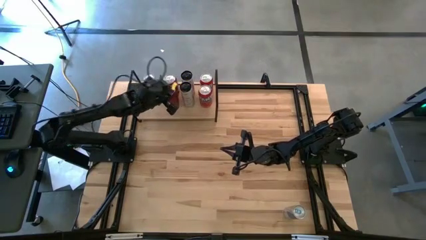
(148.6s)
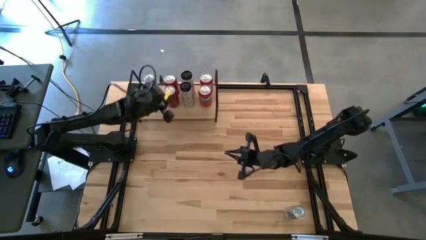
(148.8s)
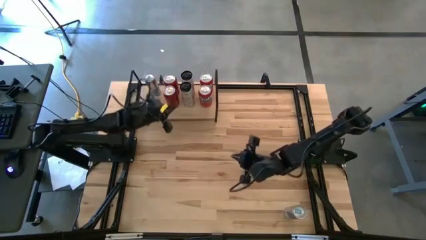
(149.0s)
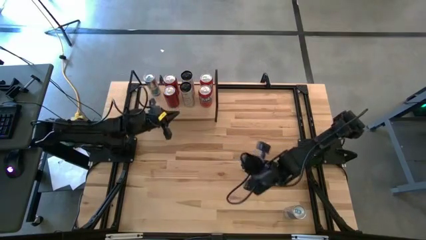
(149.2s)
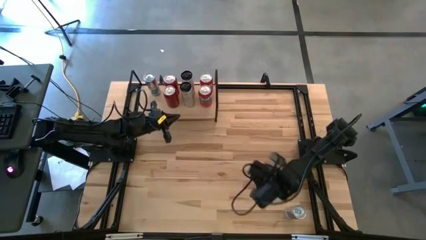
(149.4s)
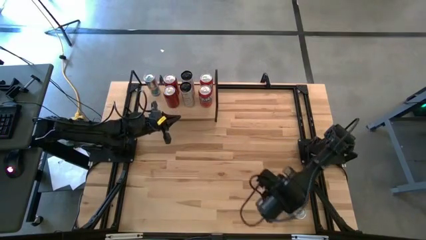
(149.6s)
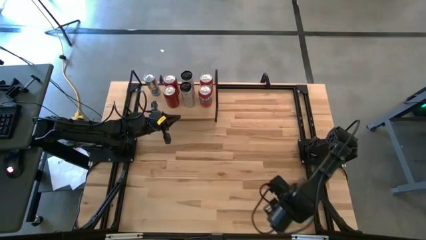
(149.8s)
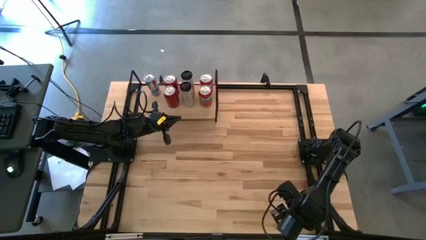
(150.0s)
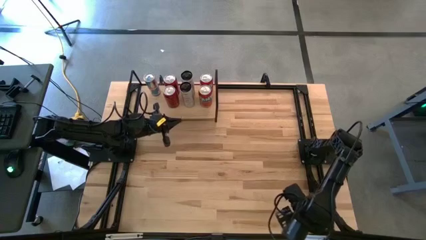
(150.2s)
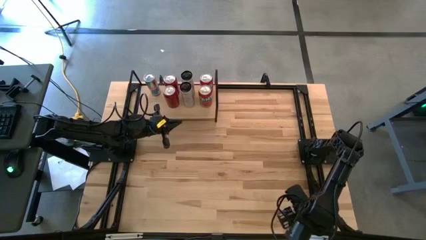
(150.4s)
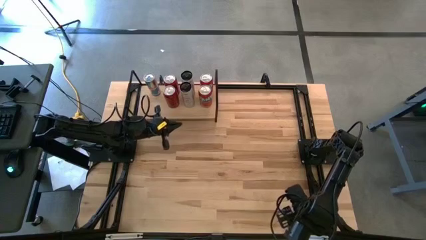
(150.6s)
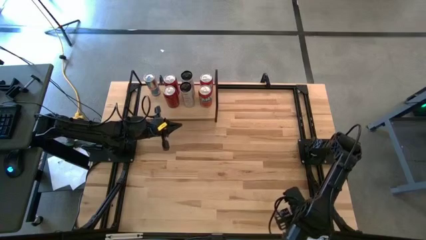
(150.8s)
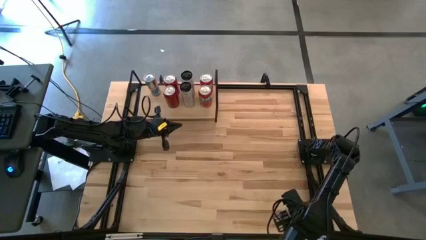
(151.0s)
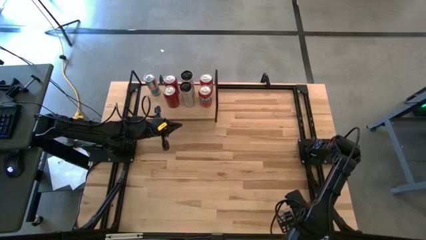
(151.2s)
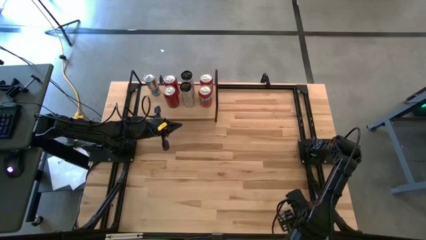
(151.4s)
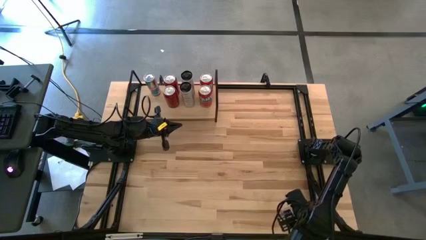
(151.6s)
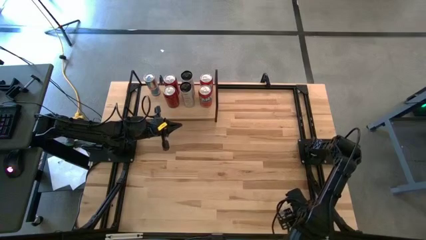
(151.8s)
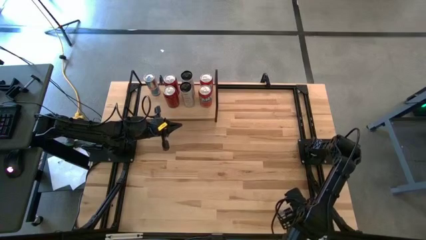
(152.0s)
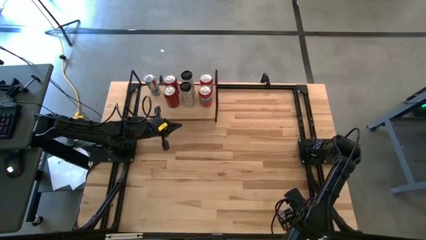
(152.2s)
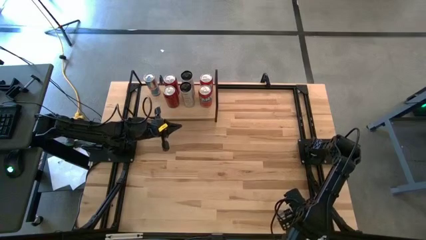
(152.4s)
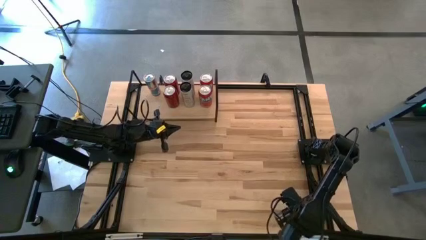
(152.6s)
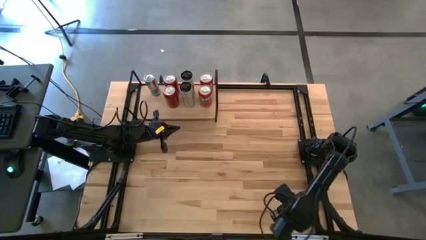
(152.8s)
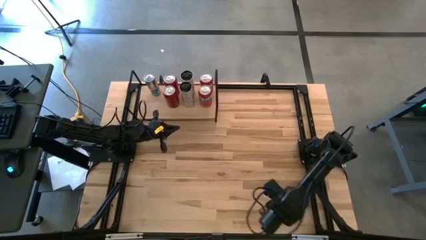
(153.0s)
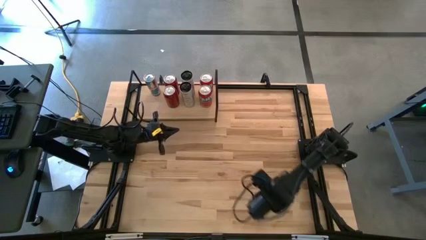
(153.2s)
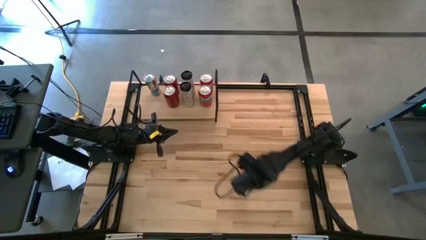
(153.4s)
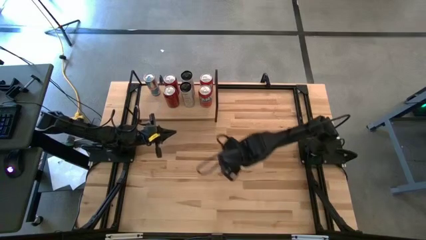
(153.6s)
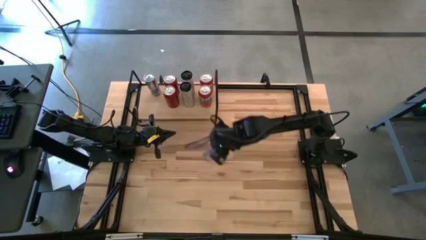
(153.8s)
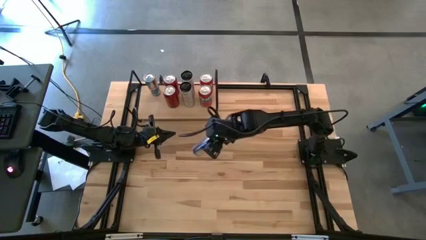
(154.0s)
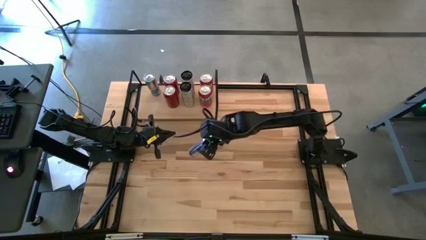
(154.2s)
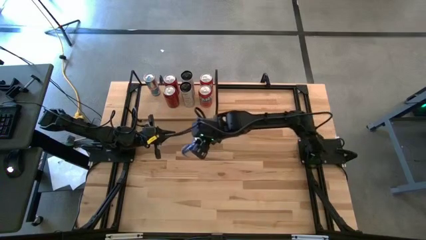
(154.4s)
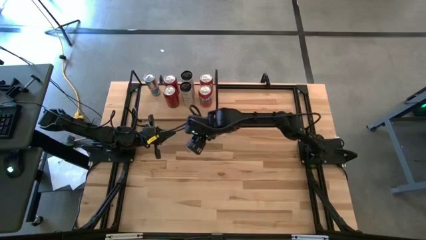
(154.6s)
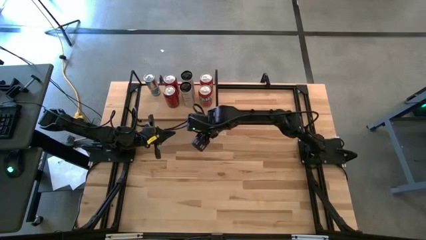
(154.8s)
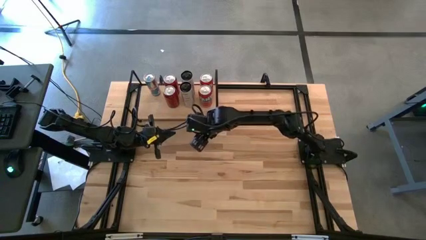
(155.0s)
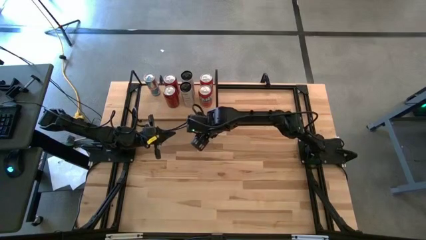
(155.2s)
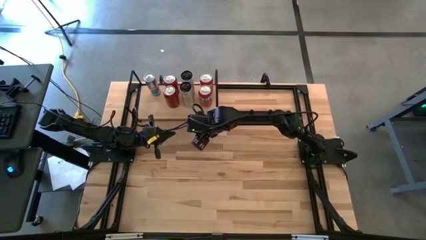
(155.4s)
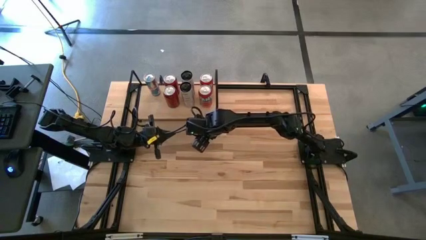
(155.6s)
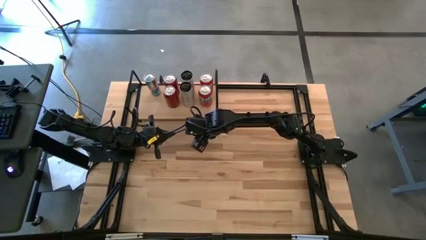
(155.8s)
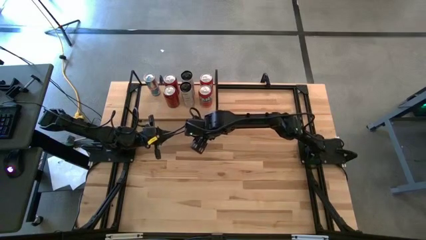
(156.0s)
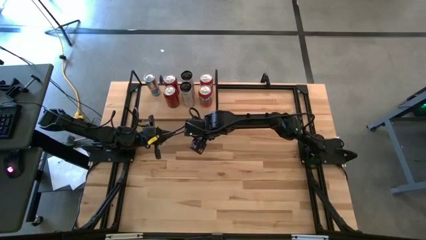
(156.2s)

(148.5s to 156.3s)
Task: Place canned beverage on shelf
Put the blue soda can aligned with the other blue soda can on the shelf

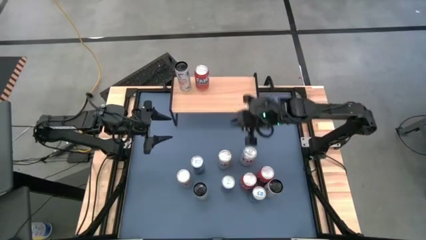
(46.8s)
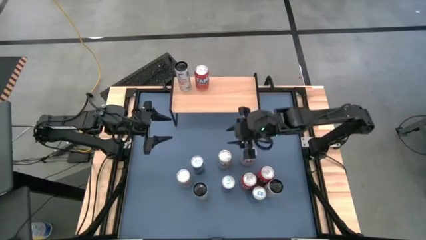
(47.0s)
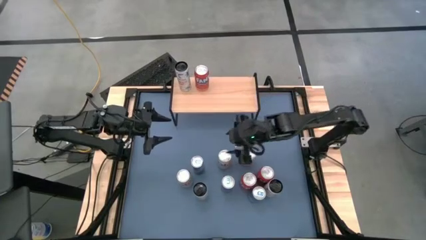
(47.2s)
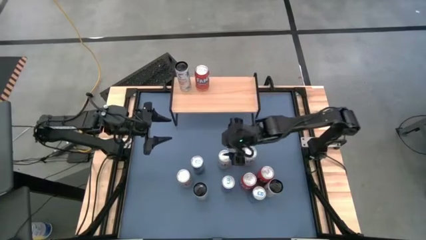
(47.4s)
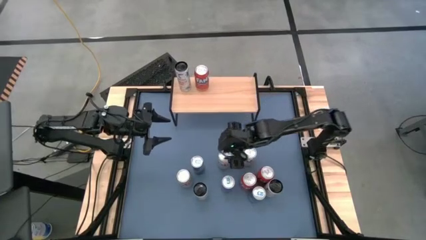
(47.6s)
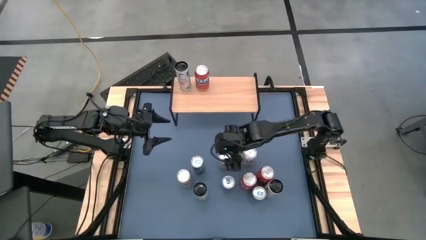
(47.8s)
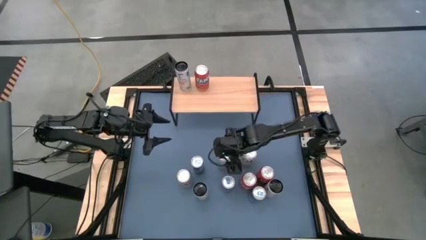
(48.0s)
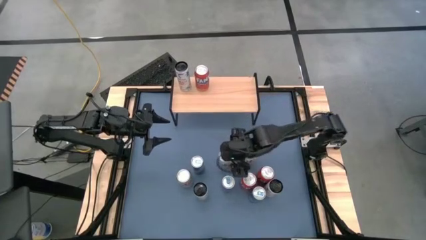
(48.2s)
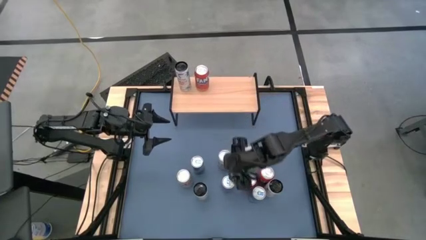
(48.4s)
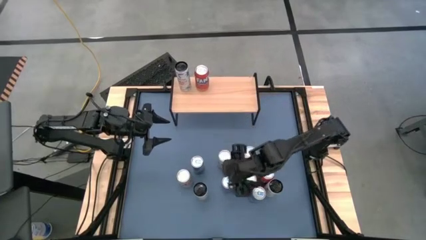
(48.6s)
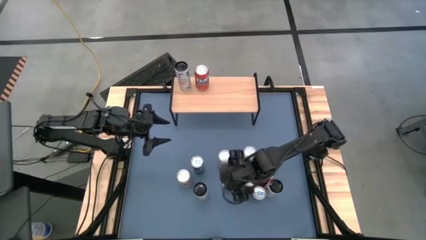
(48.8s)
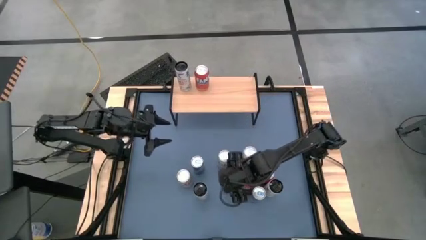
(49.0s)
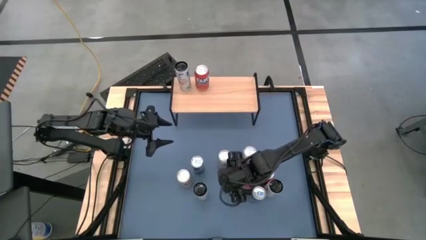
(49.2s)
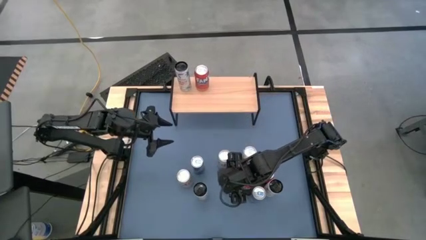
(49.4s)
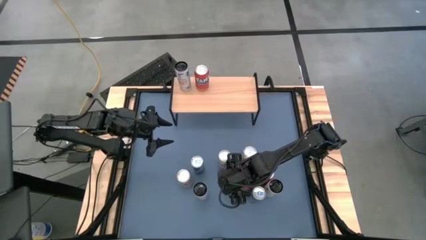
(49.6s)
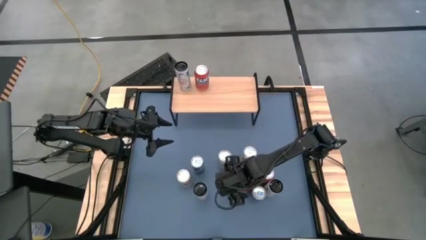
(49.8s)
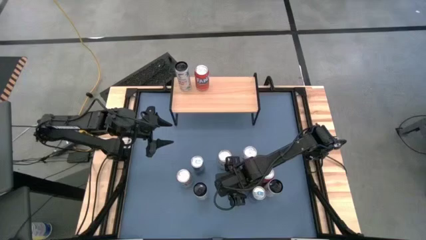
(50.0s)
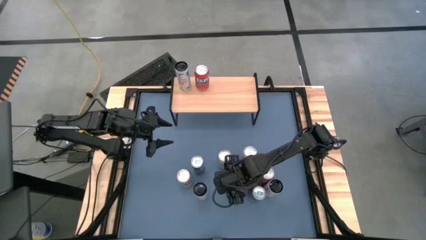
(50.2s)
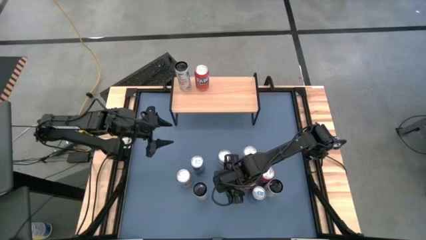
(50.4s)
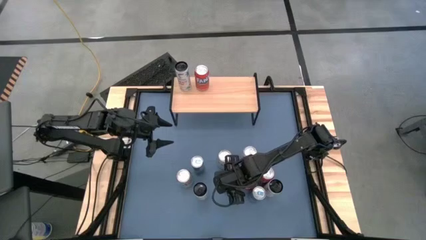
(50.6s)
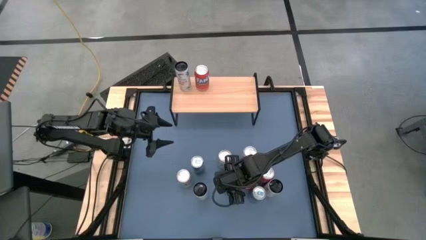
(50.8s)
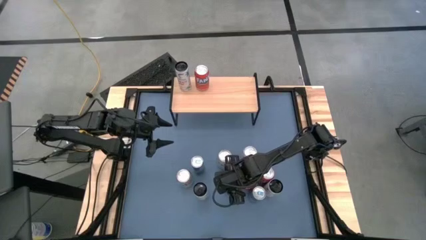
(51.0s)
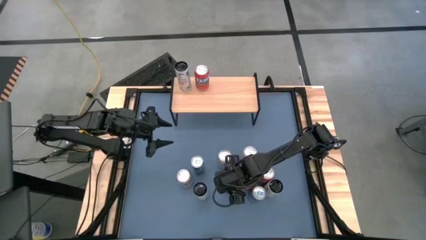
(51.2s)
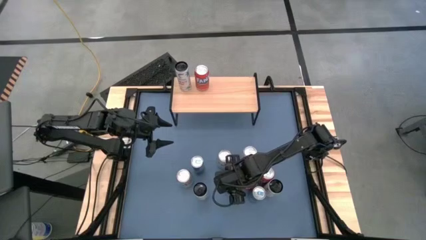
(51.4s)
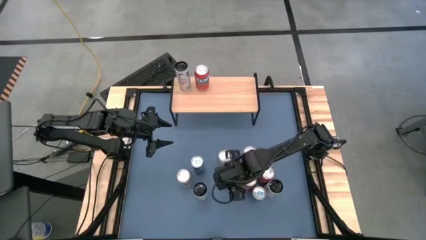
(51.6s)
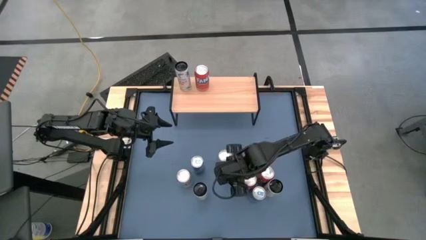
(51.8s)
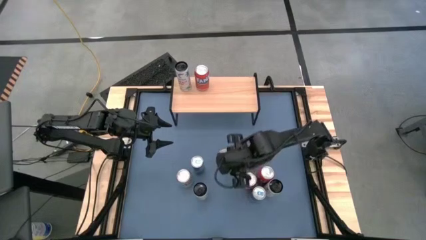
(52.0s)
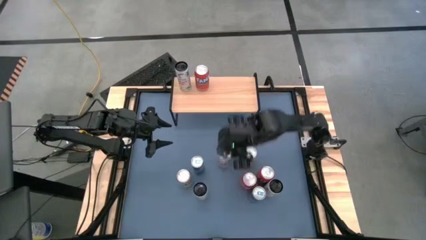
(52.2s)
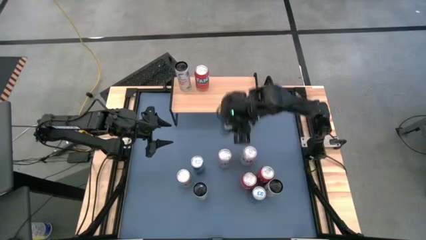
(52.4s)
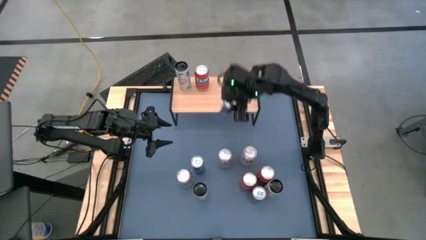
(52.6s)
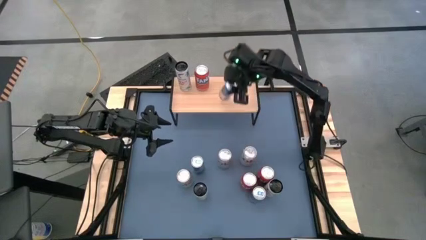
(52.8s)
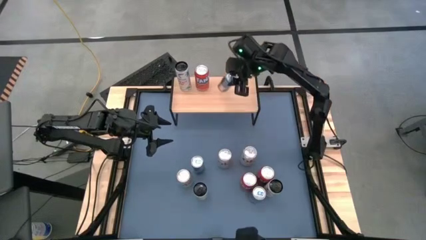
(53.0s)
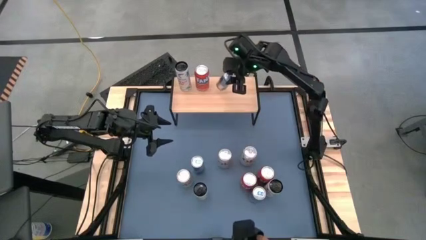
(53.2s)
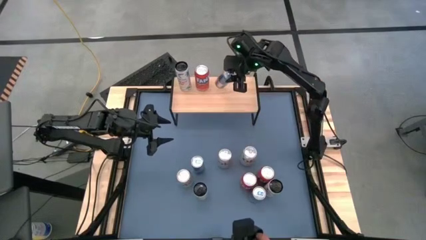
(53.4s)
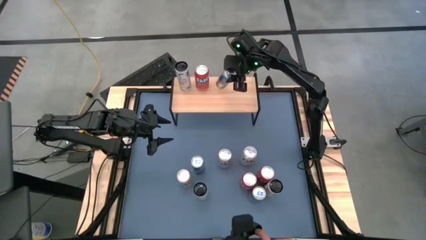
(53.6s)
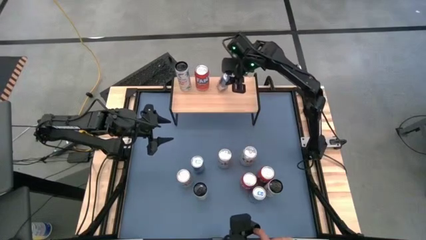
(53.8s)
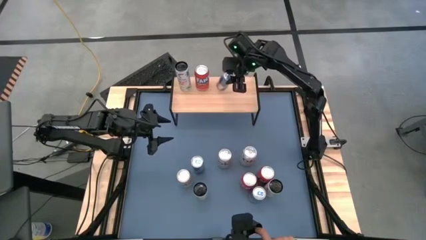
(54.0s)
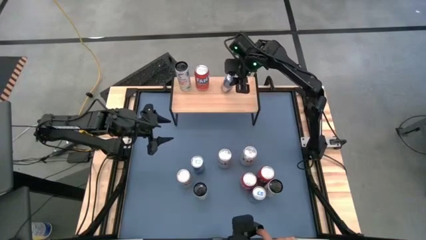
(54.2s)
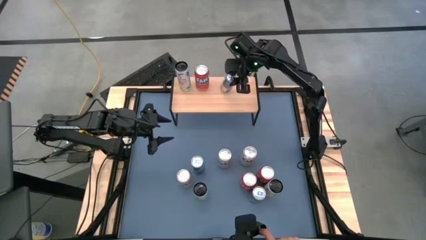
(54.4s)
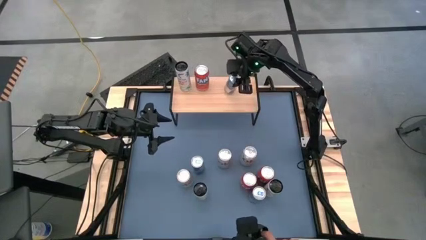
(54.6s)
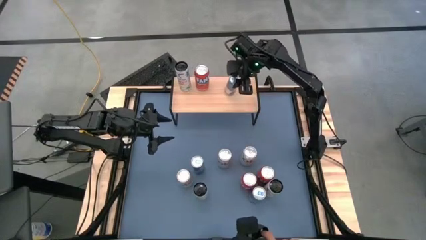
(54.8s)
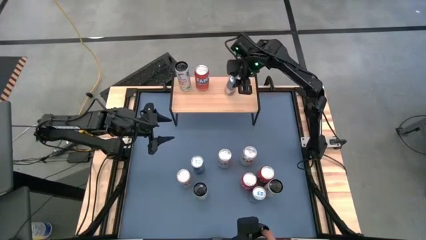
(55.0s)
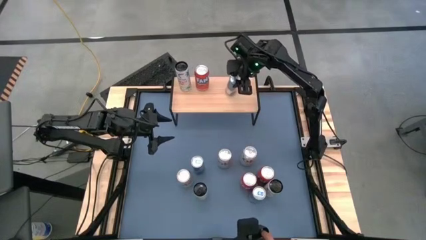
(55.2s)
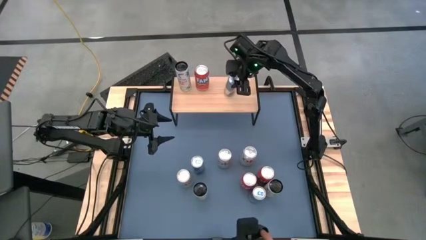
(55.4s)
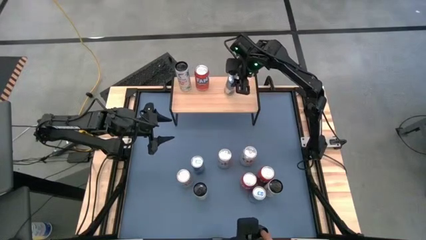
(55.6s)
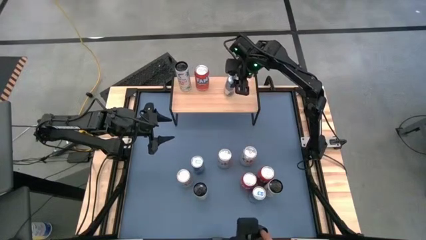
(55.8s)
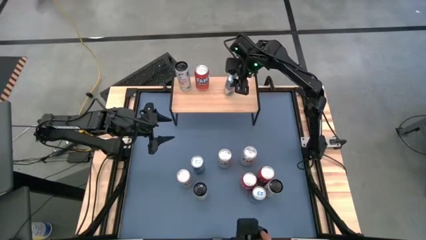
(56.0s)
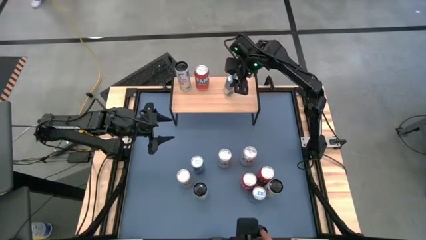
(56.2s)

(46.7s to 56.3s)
Task: Place canned beverage on shelf
Put the center blue soda on the shelf
